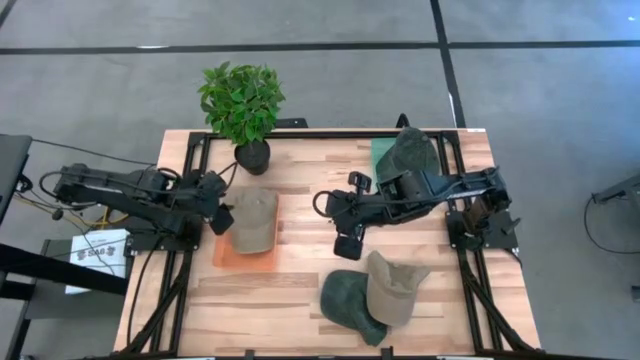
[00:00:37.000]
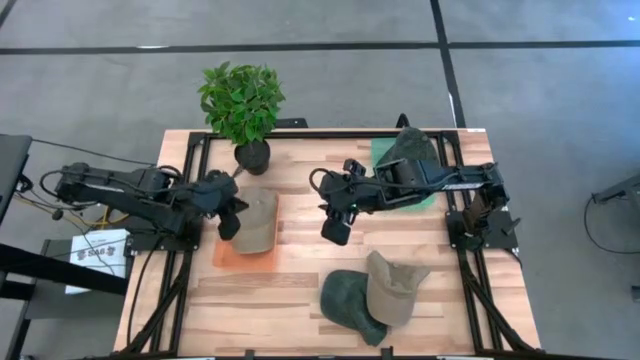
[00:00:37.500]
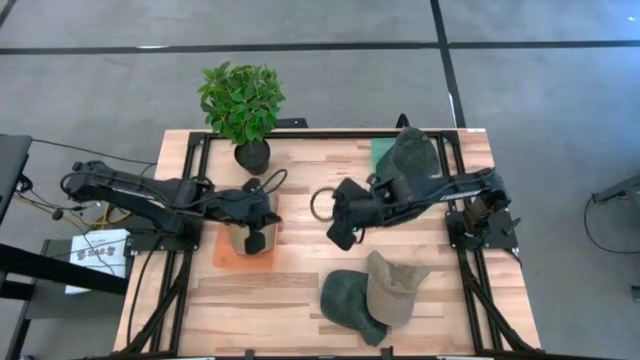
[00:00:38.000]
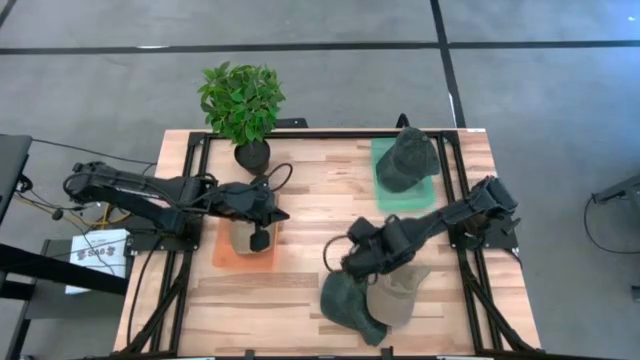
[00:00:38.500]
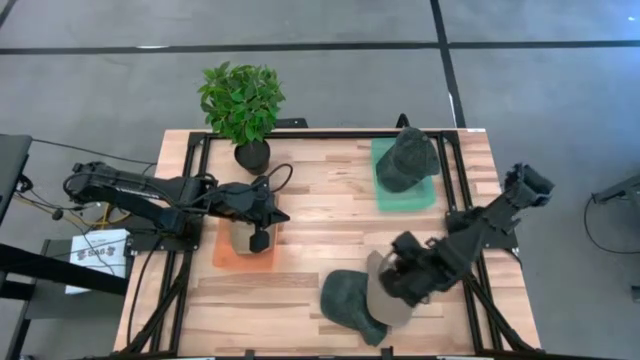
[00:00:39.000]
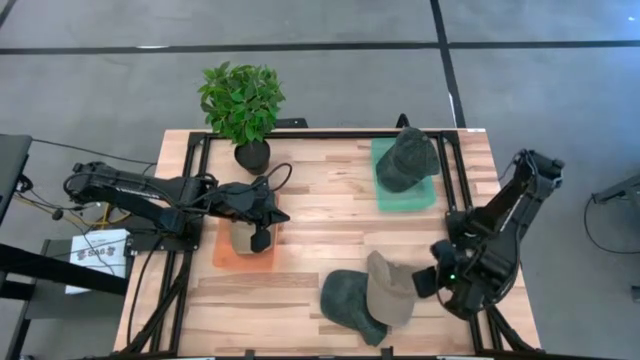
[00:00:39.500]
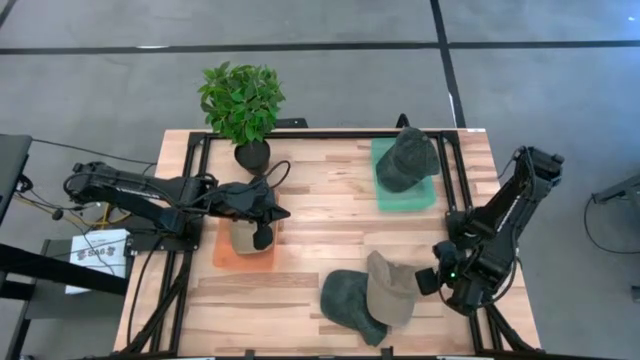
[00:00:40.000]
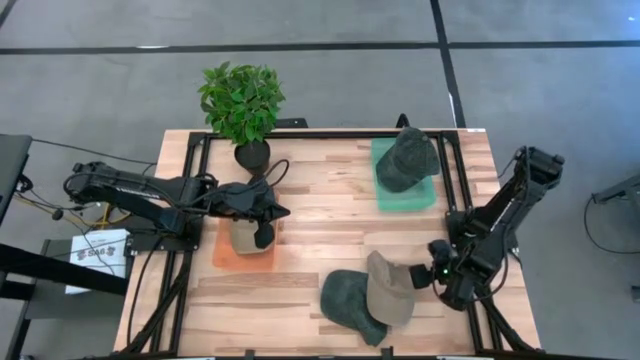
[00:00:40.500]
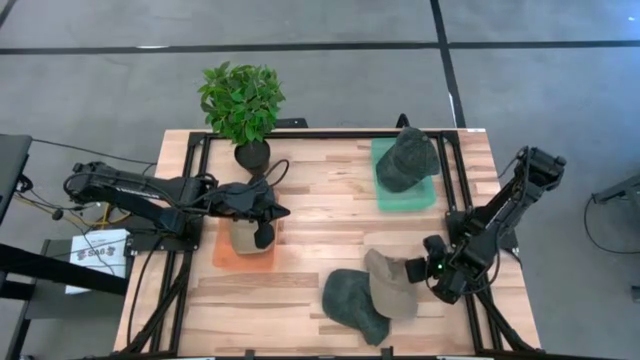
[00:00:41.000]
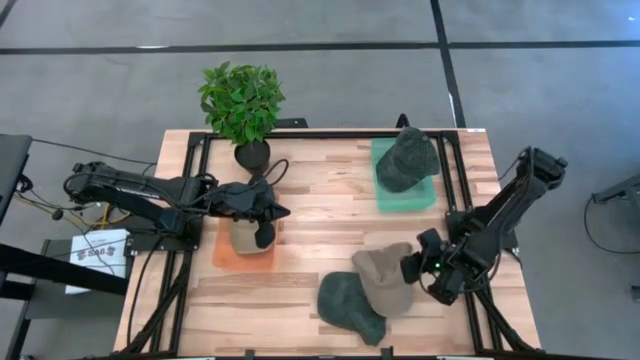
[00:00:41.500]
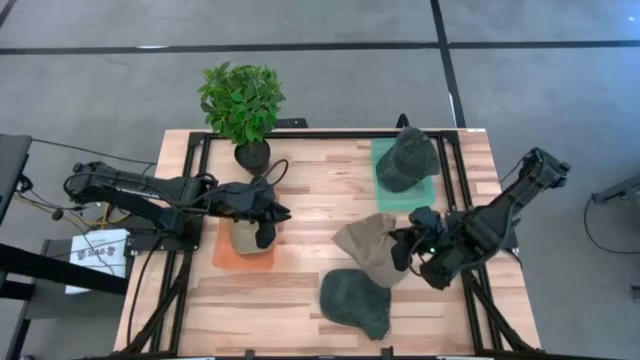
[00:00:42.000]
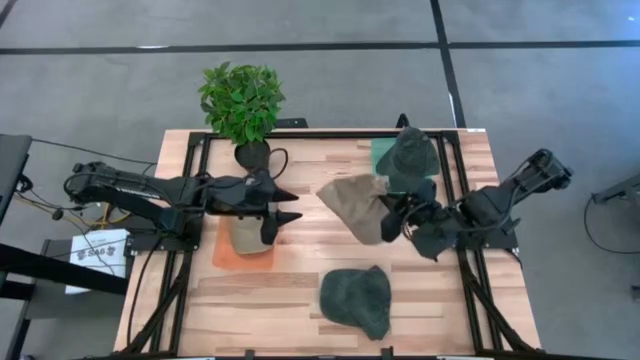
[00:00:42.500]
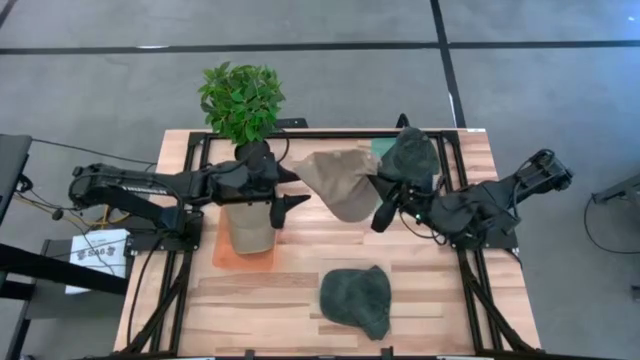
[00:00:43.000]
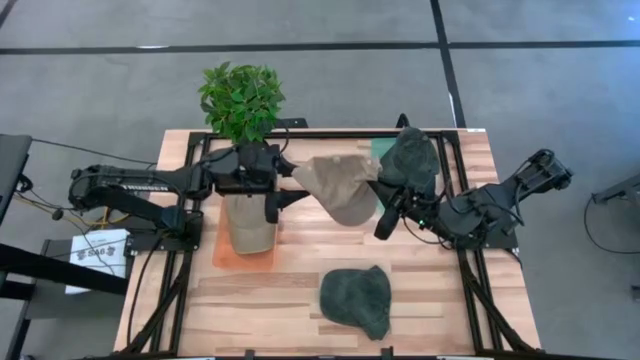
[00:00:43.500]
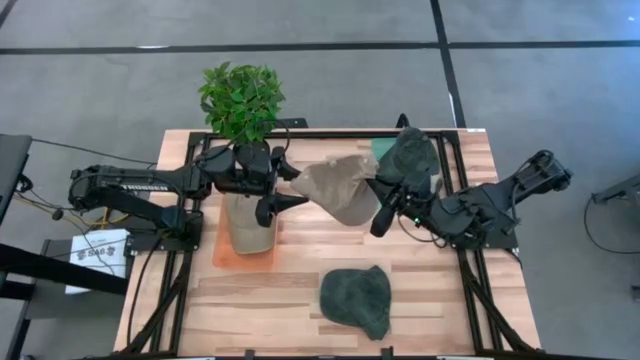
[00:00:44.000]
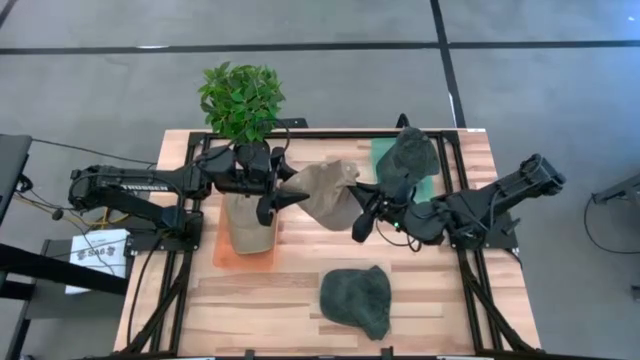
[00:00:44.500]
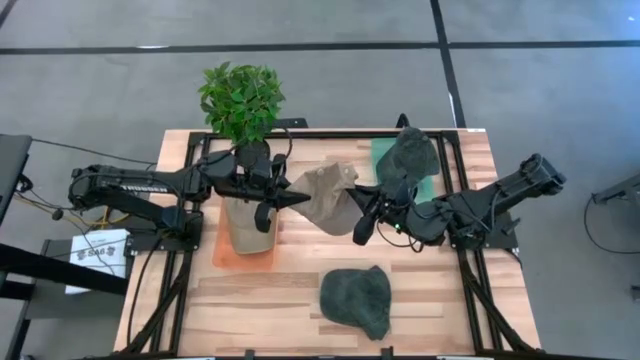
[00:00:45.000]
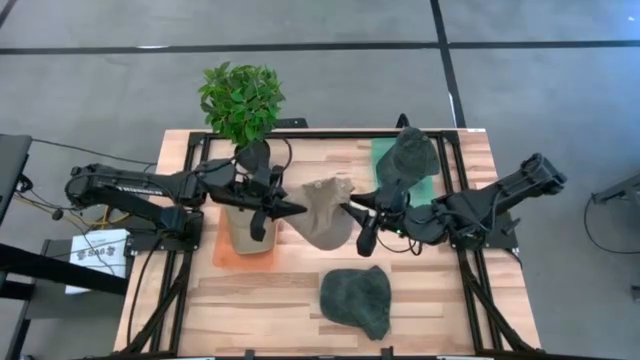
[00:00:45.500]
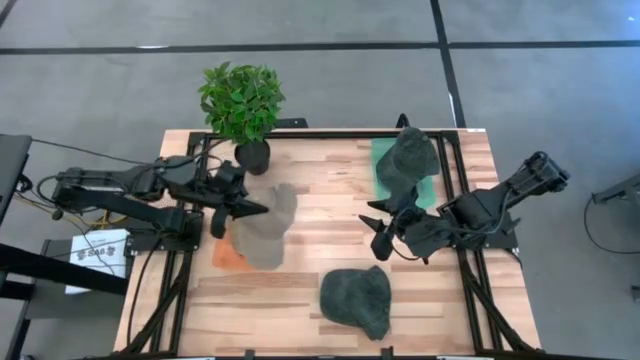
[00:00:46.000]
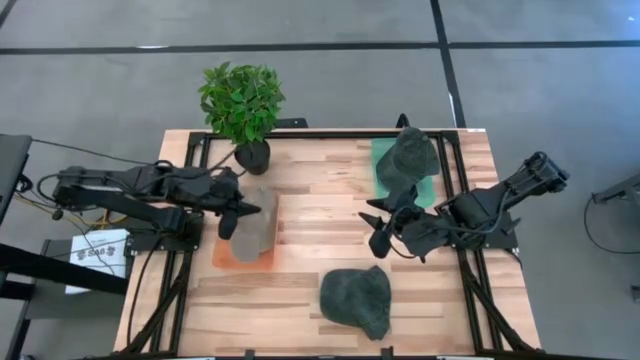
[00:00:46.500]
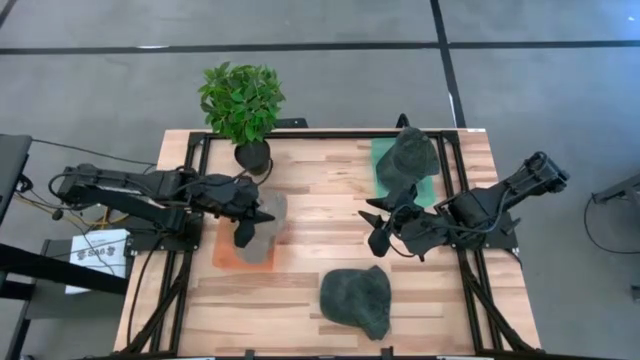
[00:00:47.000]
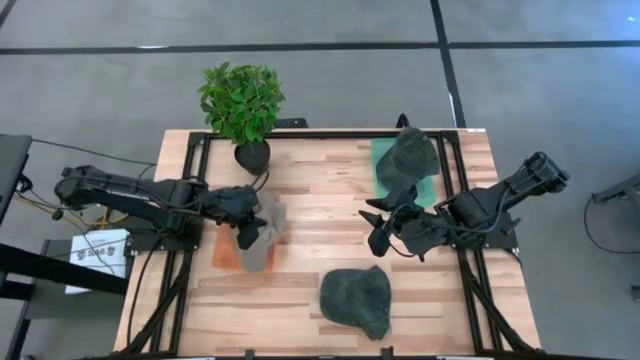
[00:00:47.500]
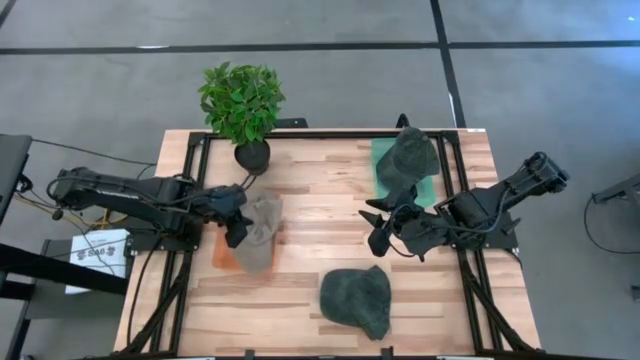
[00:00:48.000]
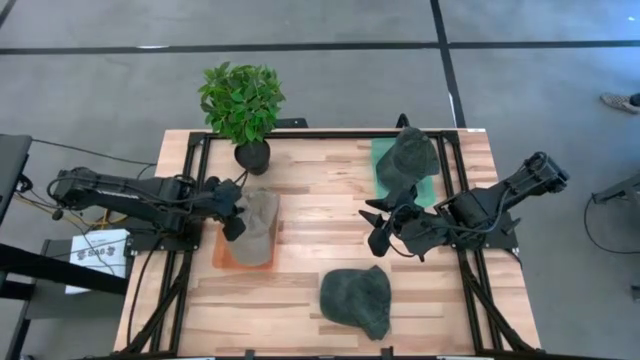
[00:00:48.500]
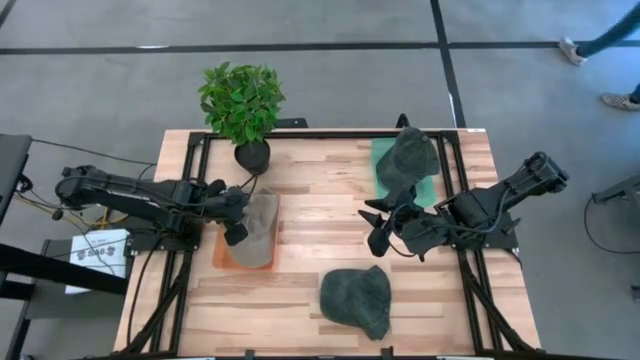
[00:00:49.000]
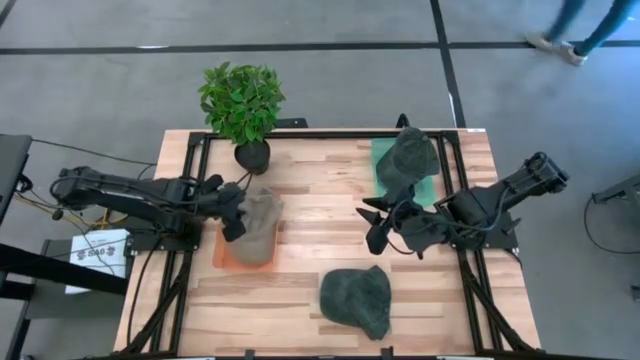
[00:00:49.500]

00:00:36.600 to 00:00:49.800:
Task: Pick & Place hat
Put the brown cap into the orange bin

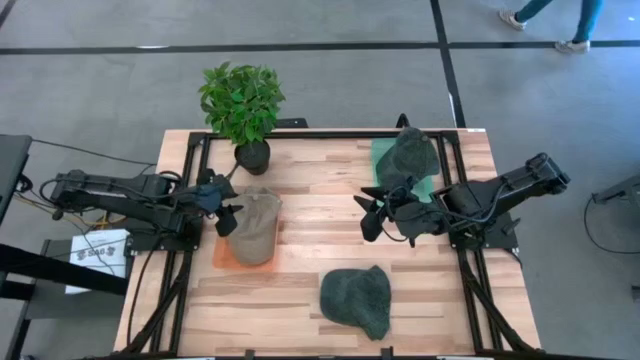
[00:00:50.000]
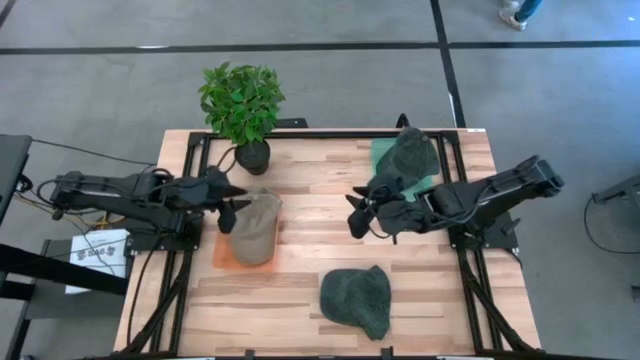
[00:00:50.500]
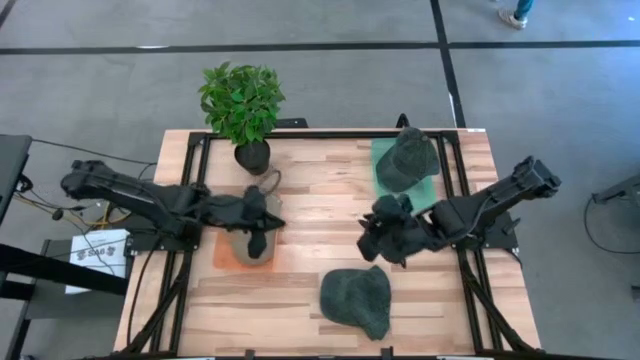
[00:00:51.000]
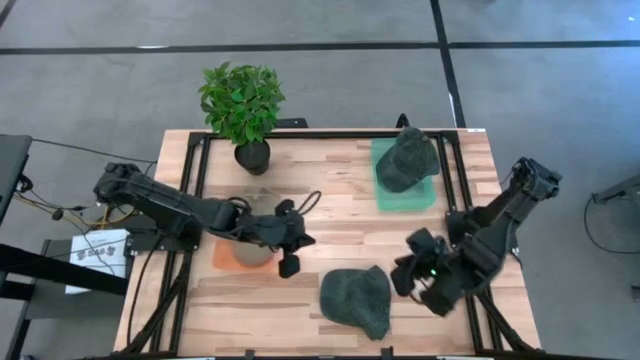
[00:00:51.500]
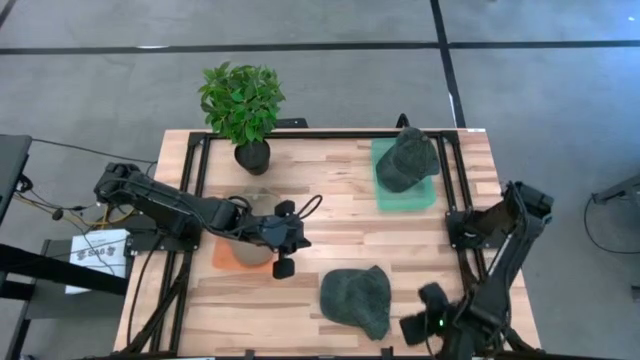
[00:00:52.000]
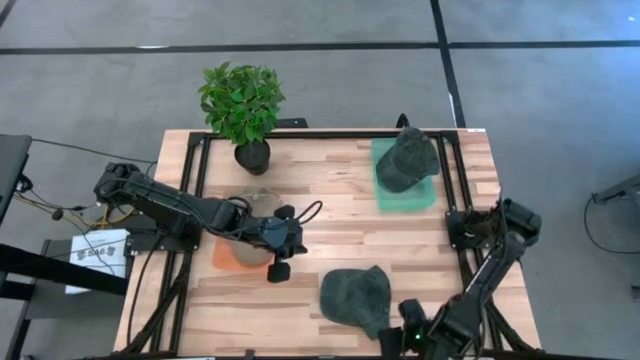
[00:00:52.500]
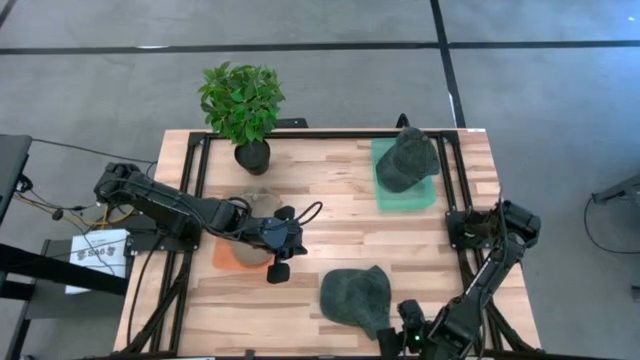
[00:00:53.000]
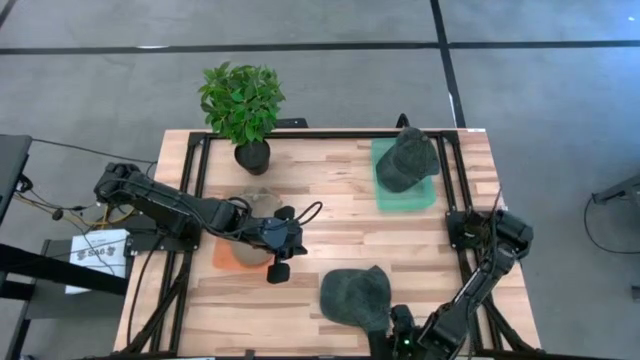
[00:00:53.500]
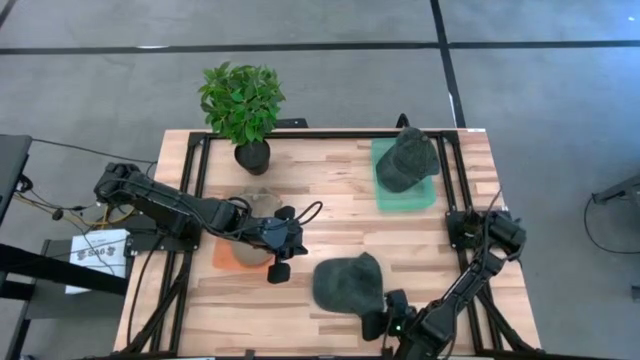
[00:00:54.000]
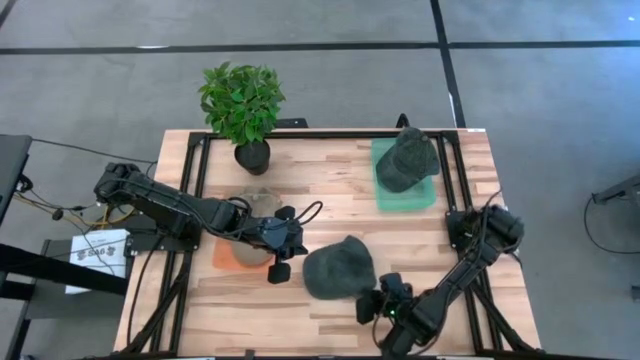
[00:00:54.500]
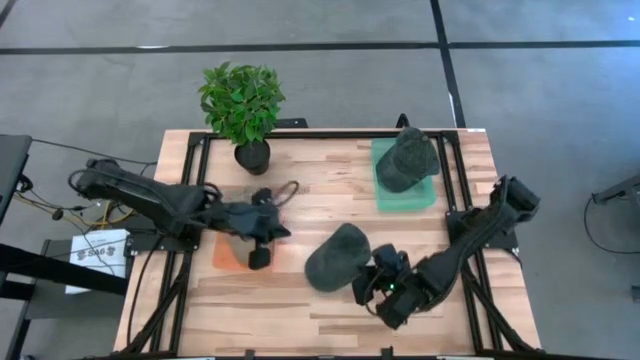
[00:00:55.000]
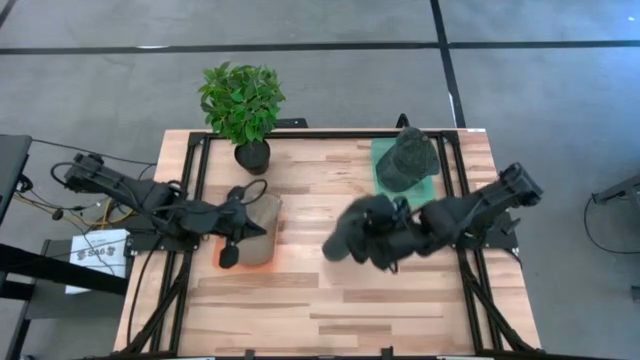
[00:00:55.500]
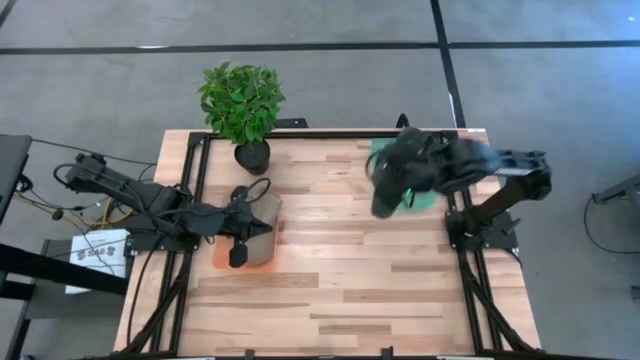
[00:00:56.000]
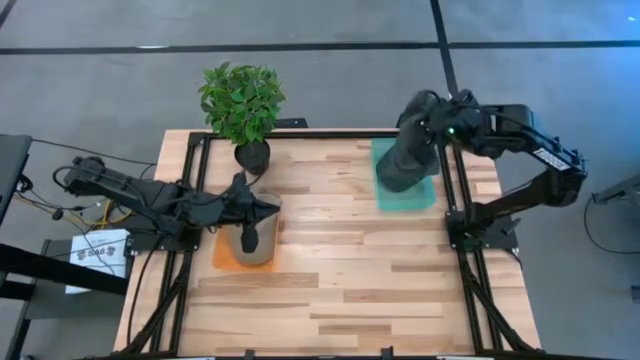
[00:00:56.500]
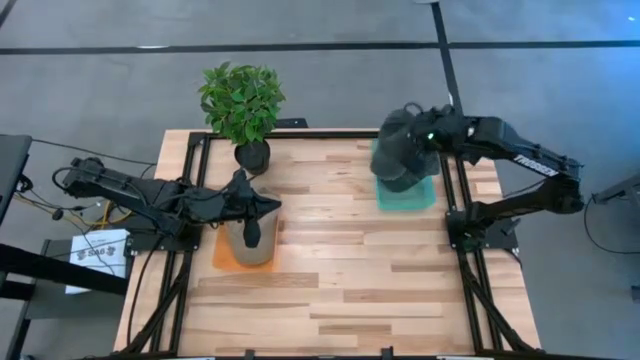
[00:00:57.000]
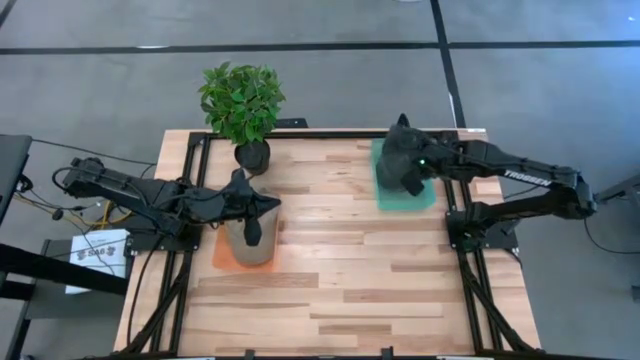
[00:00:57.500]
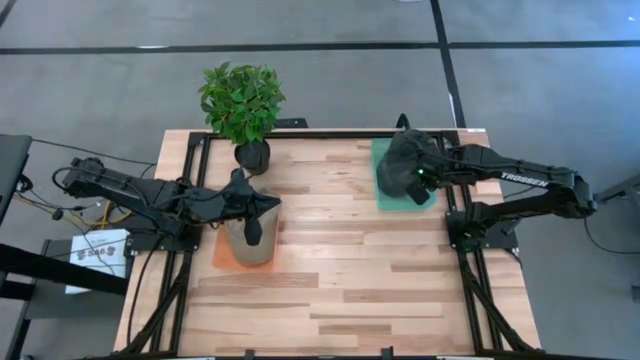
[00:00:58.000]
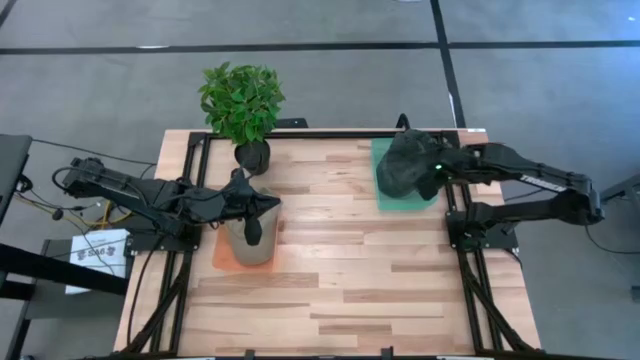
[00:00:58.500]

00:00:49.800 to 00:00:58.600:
Put the blue cap into the blue bin
